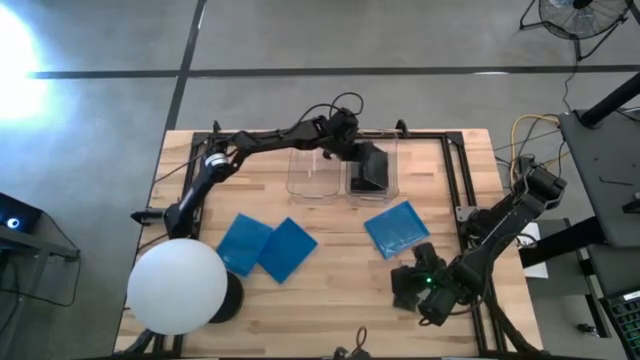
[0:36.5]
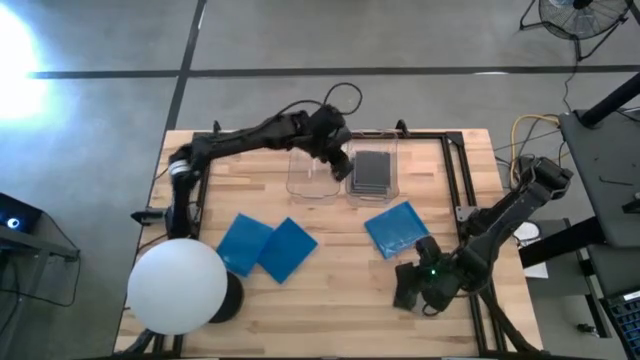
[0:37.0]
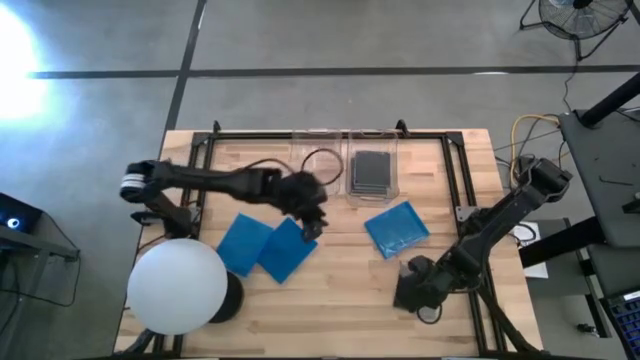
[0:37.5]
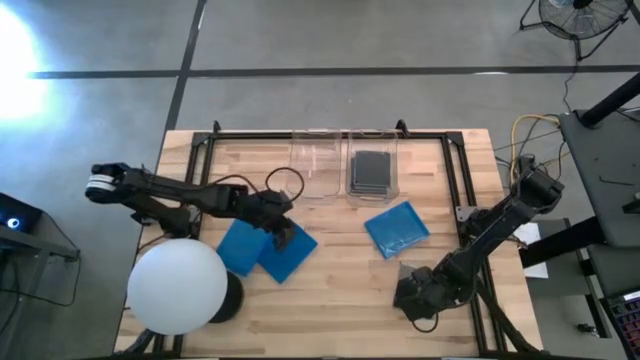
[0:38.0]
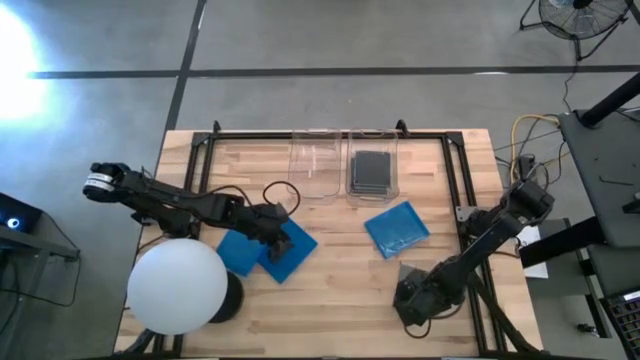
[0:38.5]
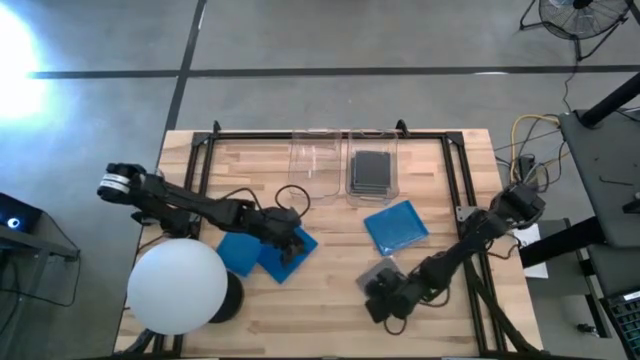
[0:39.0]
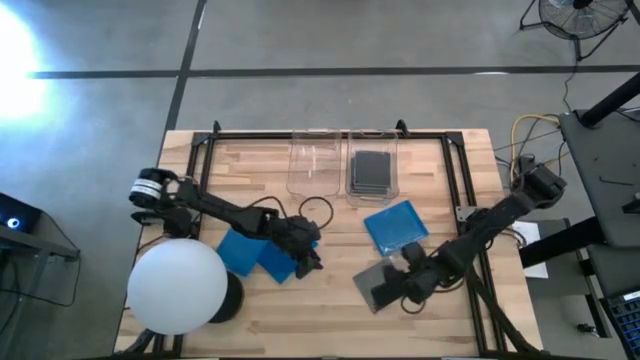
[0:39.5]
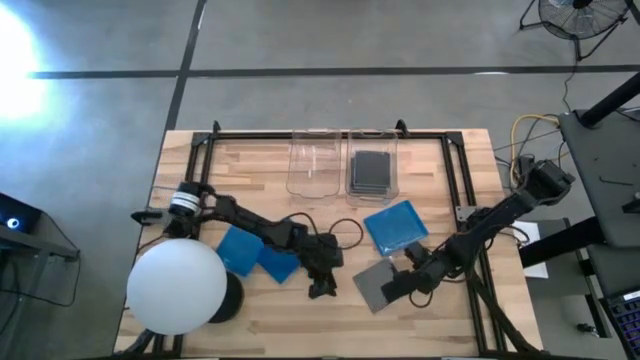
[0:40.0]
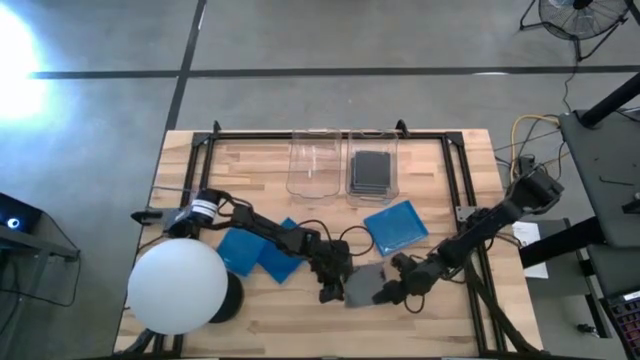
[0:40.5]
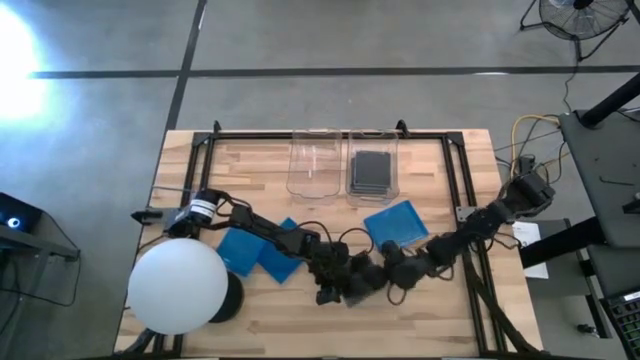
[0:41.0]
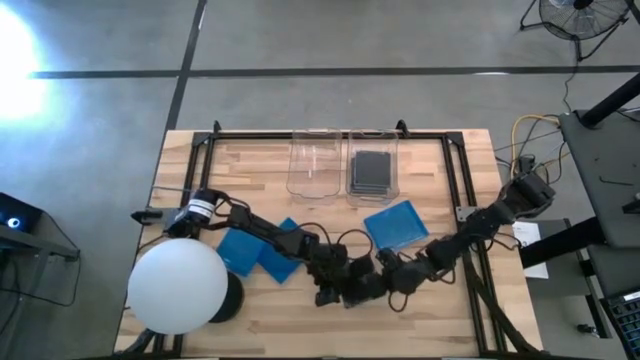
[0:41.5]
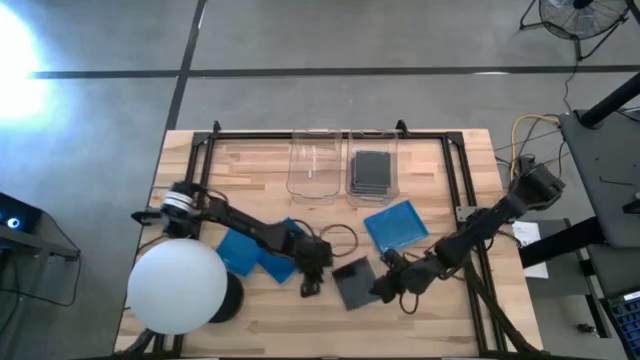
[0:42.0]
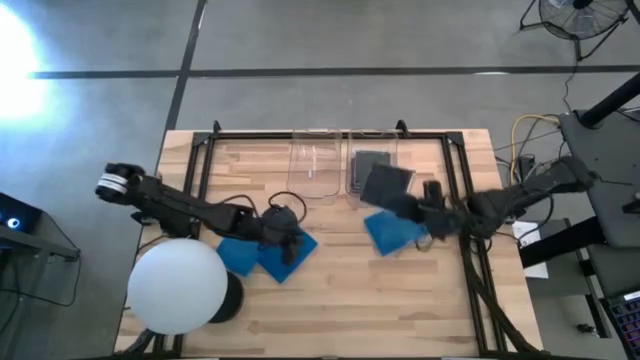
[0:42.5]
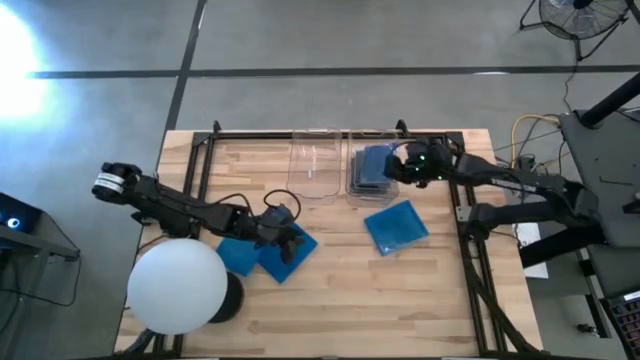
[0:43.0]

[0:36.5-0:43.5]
Task: Pick & place jewel cases by type
Put the black CD case into the right transparent bin

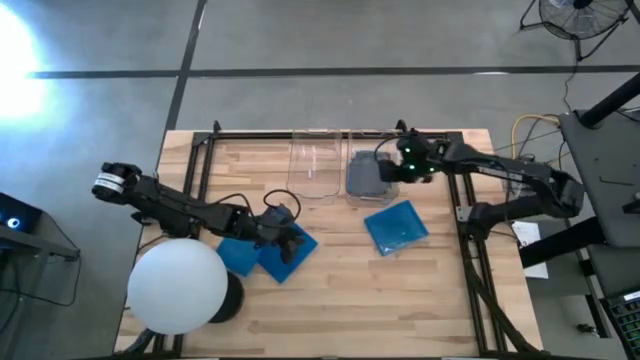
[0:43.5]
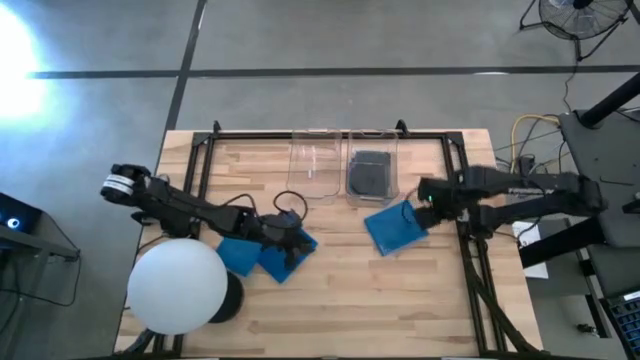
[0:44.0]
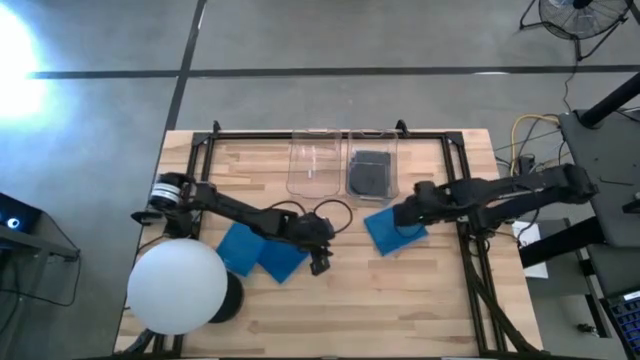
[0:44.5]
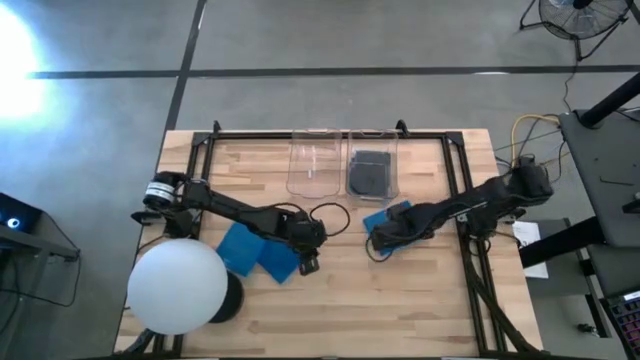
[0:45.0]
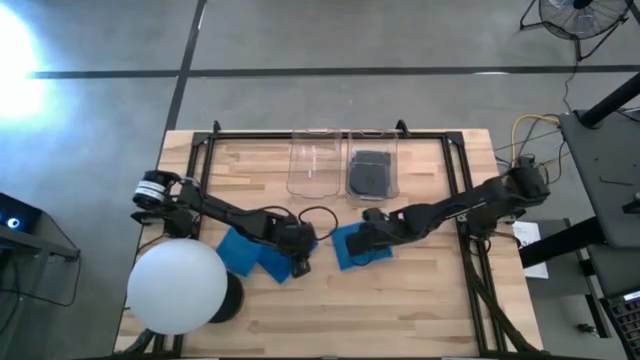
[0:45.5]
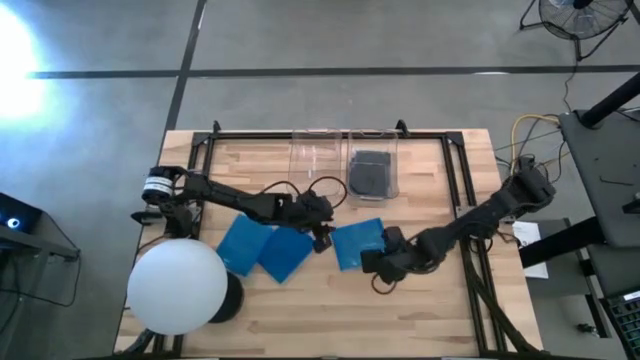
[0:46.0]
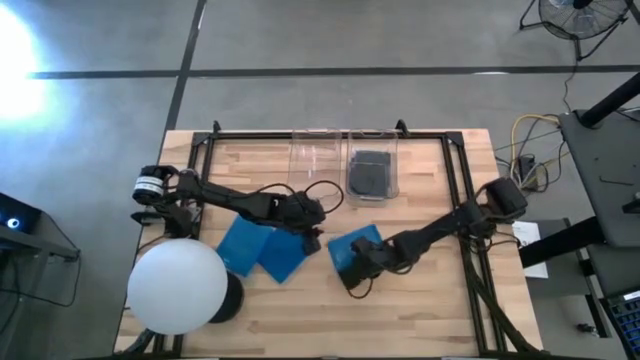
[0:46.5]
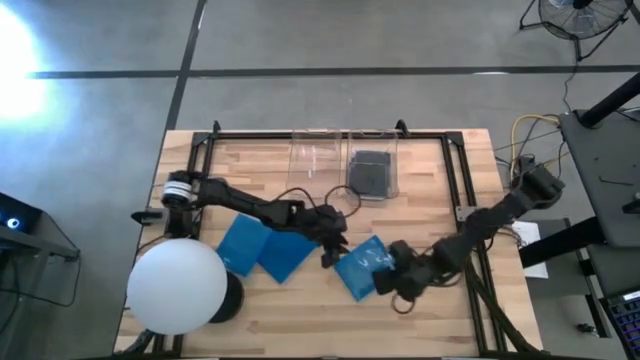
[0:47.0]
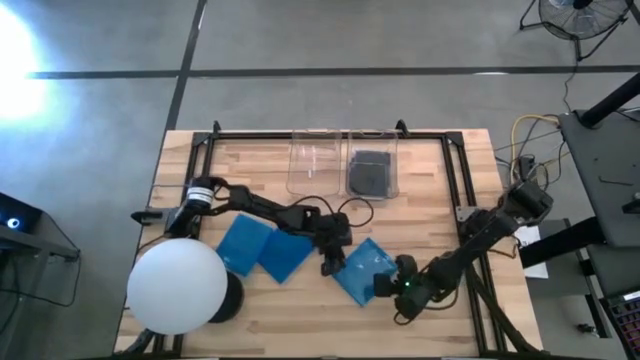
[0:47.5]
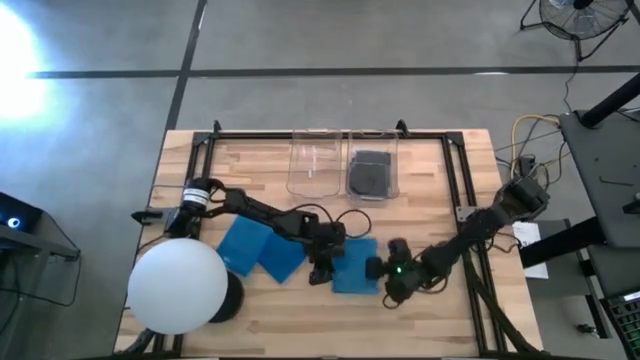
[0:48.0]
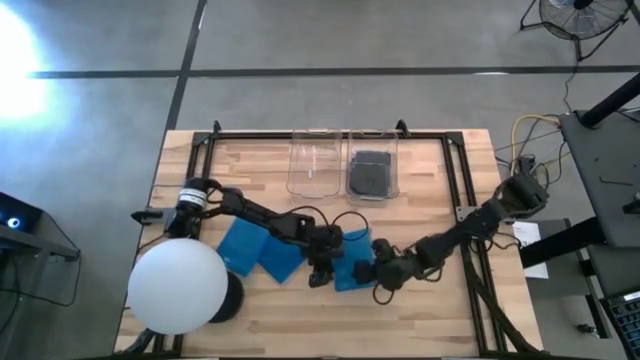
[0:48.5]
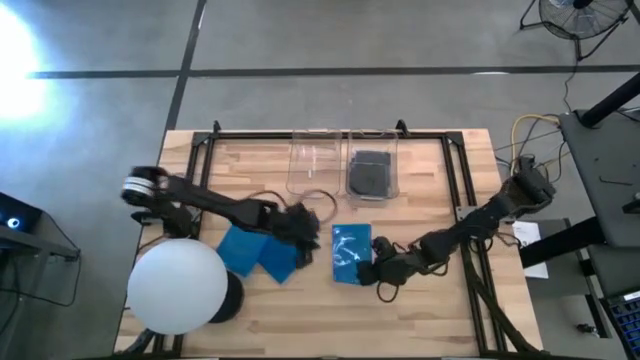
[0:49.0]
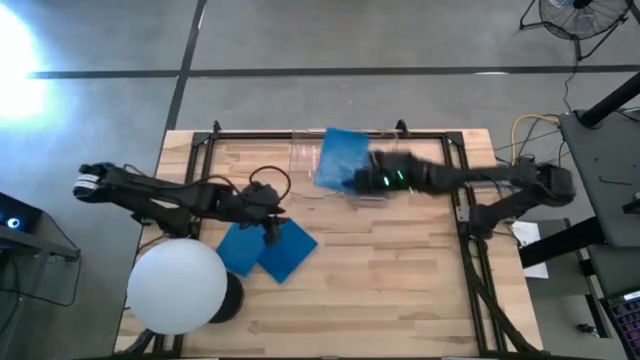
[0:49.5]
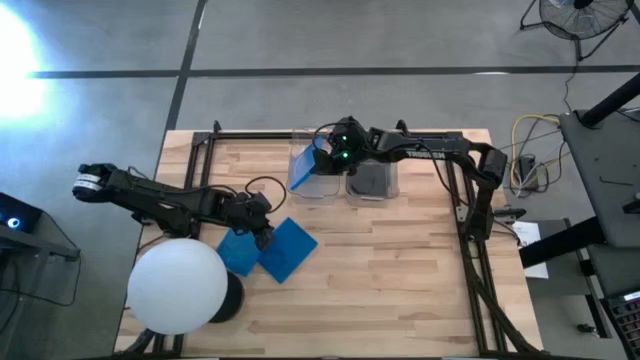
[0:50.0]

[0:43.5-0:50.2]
Put the blue CD case into the left transparent bin

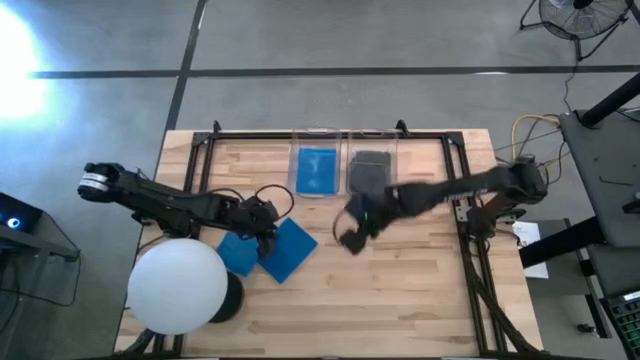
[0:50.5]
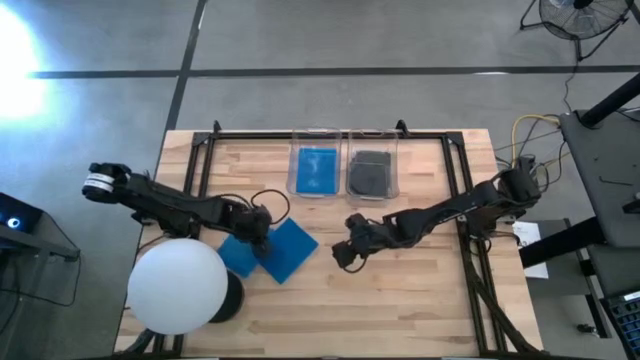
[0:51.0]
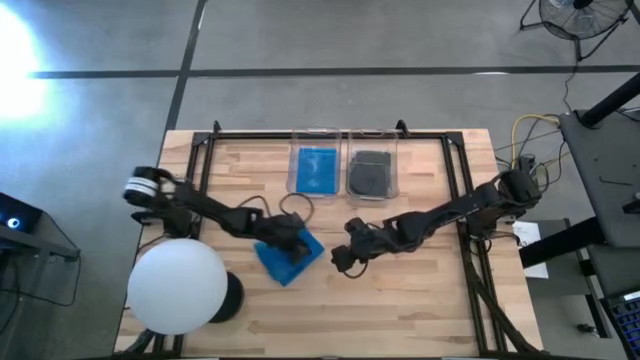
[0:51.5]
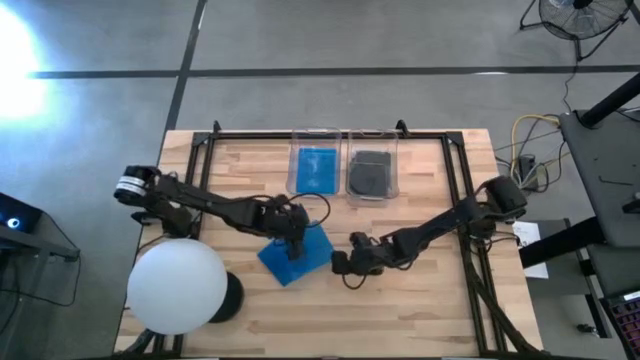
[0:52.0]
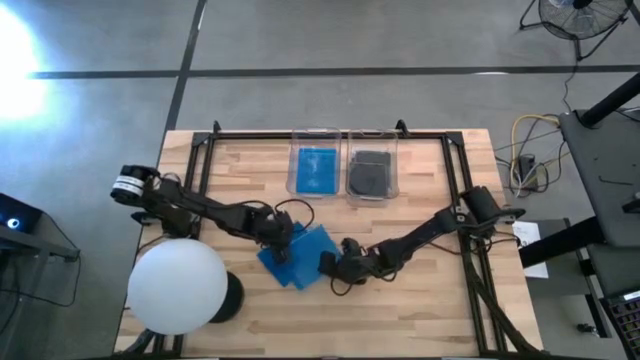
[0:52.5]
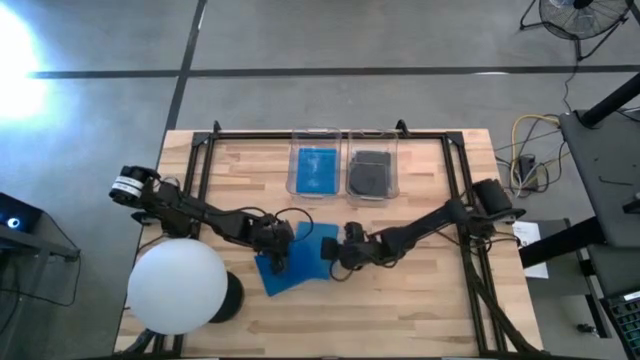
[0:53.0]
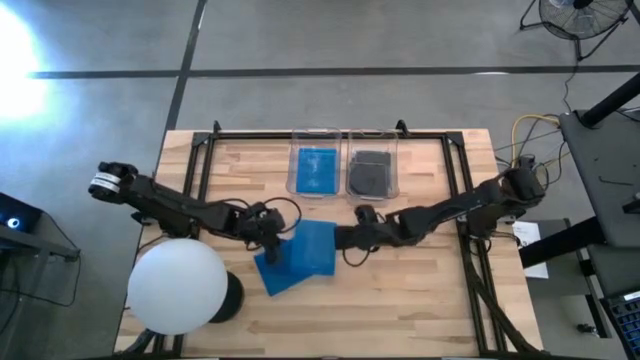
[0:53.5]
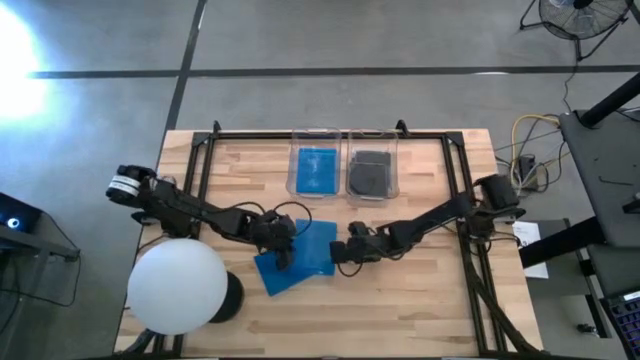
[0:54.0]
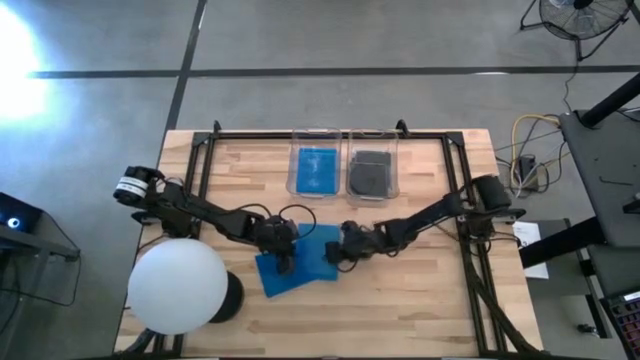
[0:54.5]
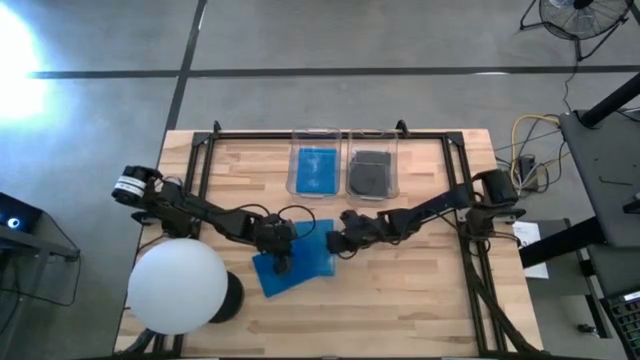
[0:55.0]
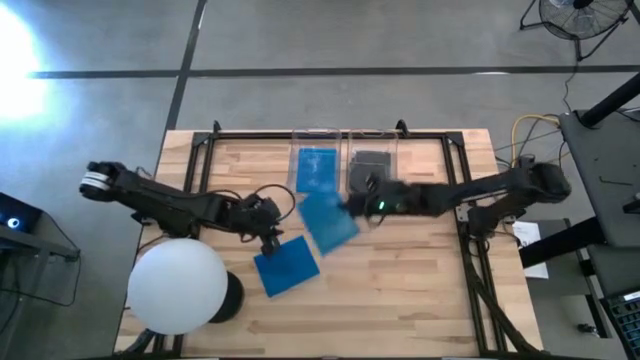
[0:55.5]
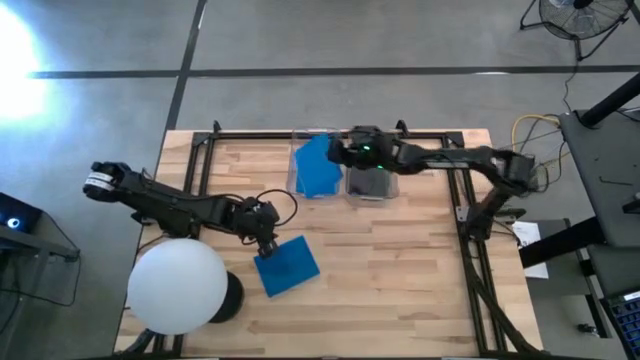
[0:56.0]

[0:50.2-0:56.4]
Put the left blue CD case into the left transparent bin

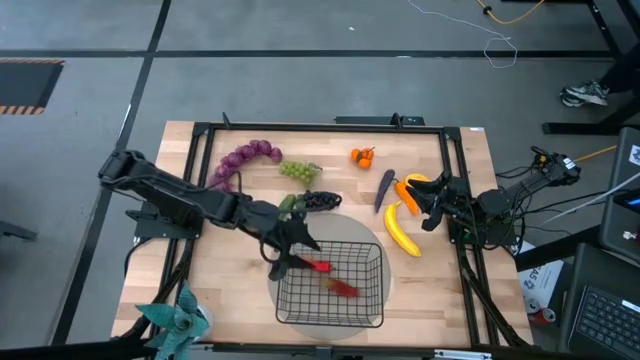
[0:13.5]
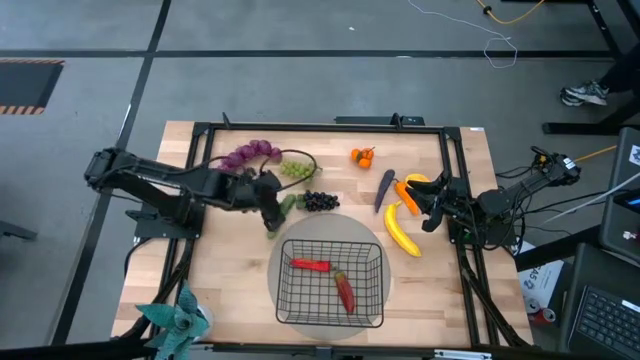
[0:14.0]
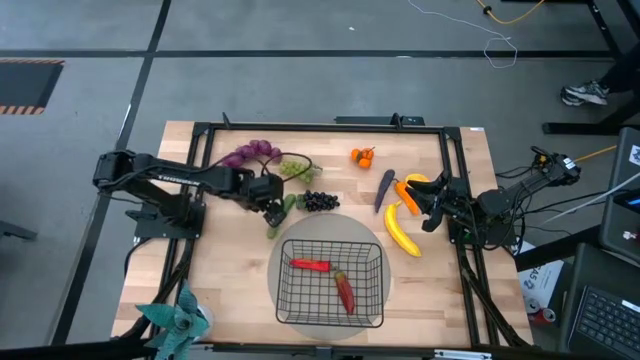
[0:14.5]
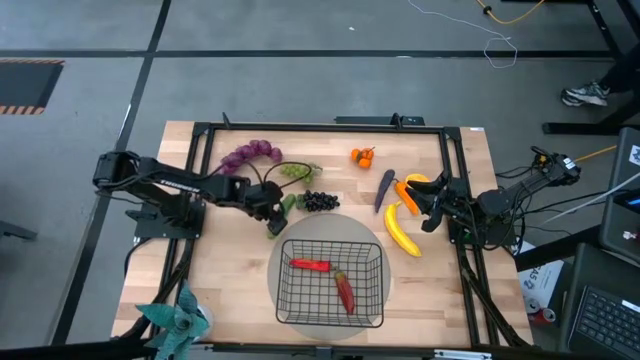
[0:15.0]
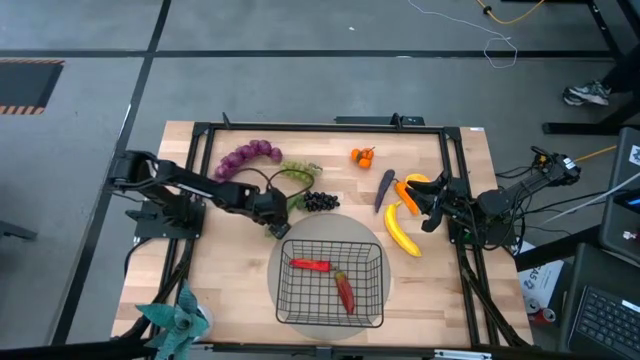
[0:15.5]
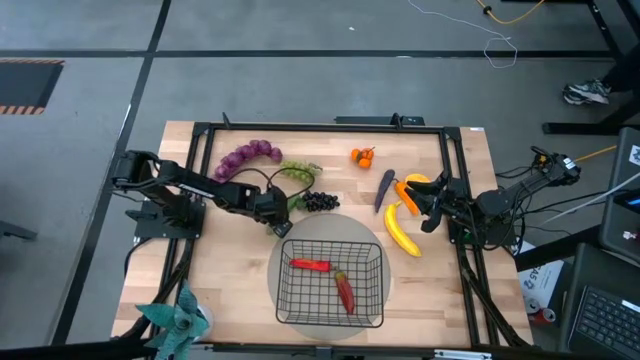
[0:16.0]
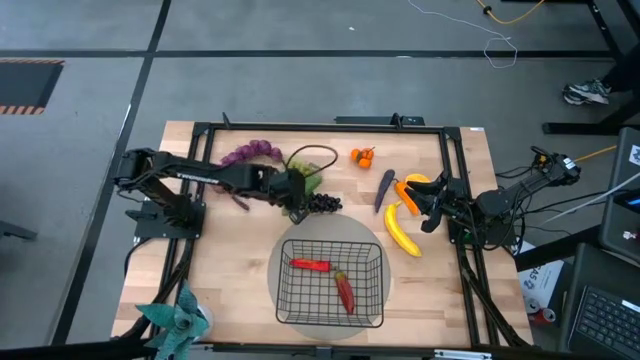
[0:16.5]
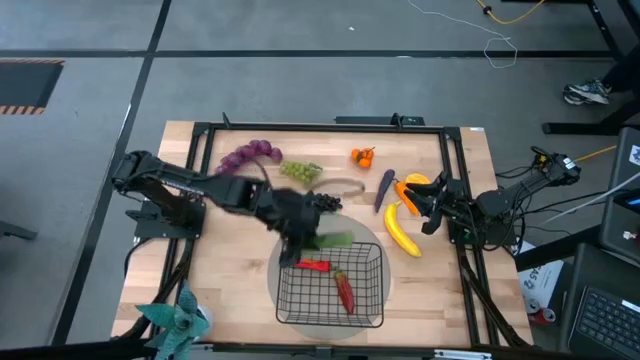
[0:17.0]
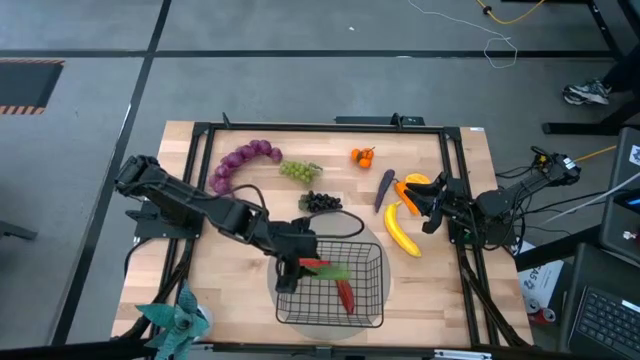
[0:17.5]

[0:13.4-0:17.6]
Task: Build produce basket
Put the cucumber into the wire basket
